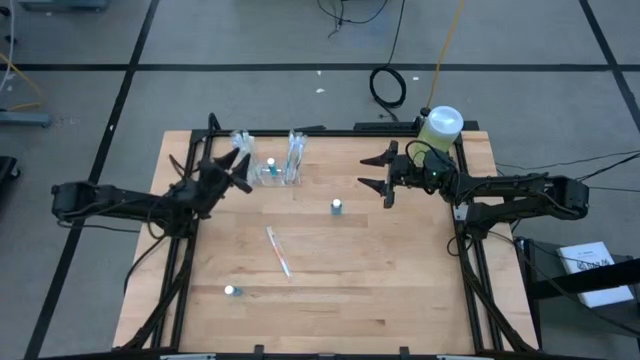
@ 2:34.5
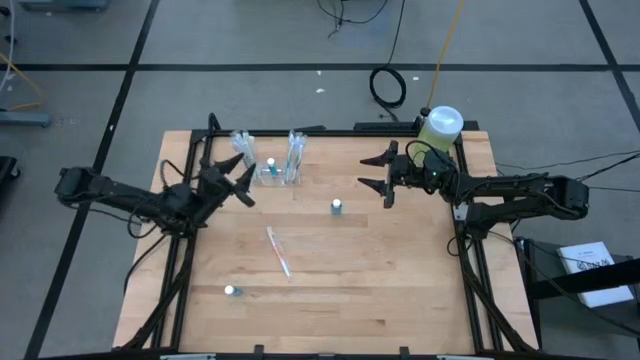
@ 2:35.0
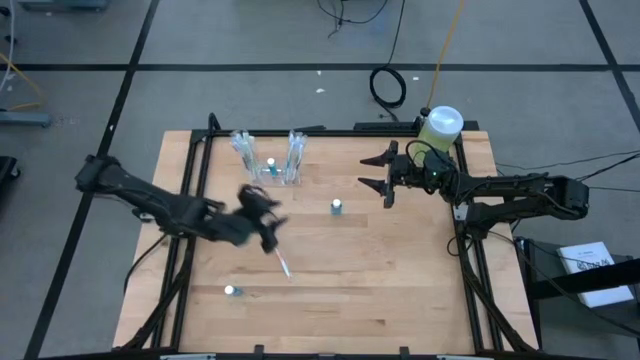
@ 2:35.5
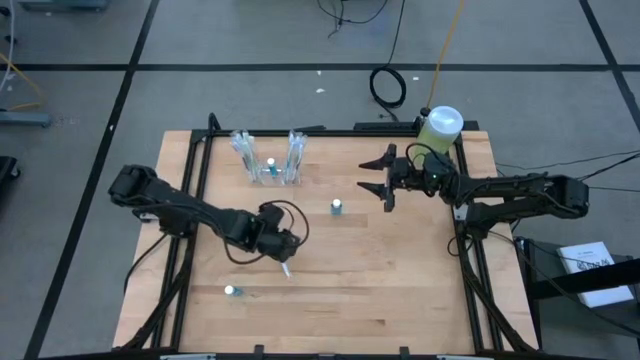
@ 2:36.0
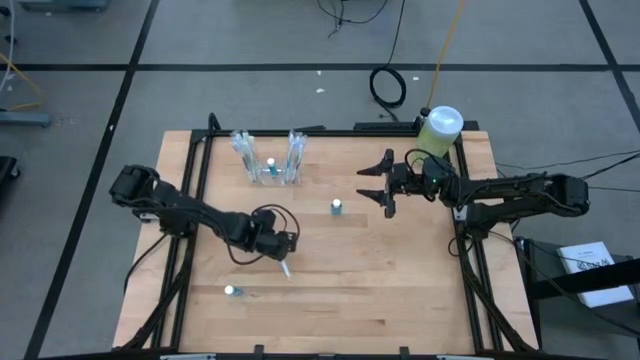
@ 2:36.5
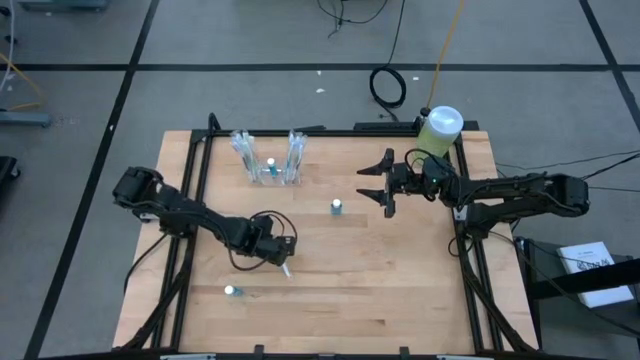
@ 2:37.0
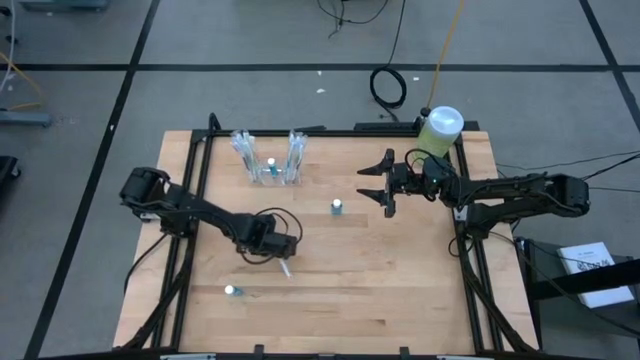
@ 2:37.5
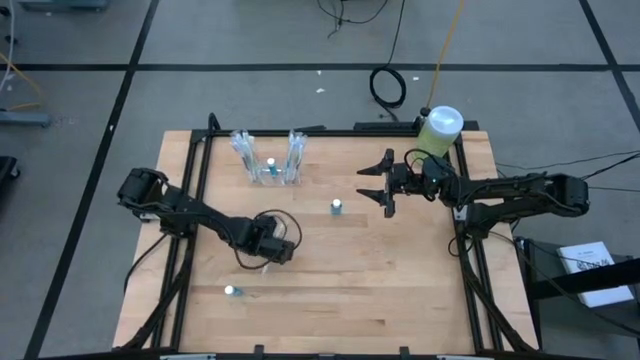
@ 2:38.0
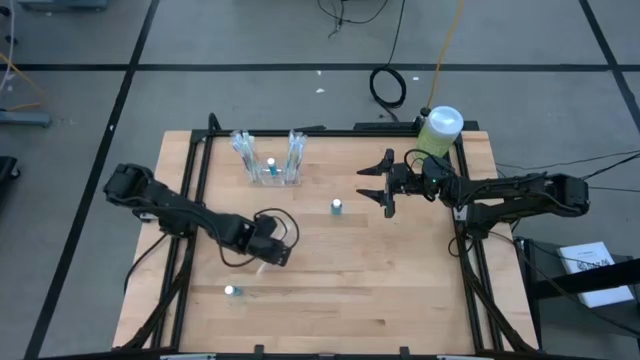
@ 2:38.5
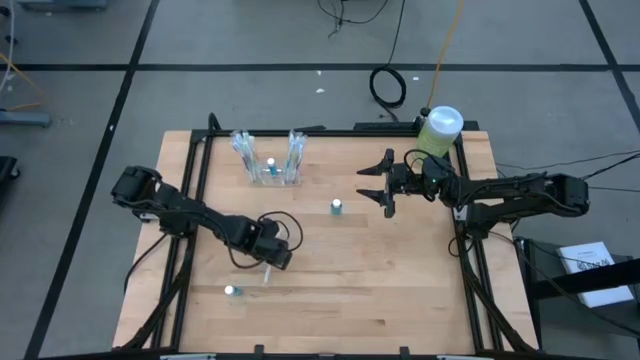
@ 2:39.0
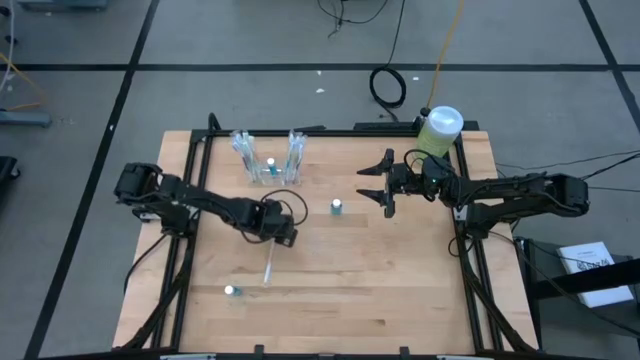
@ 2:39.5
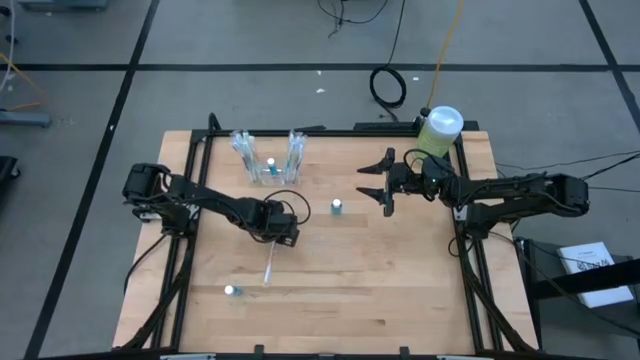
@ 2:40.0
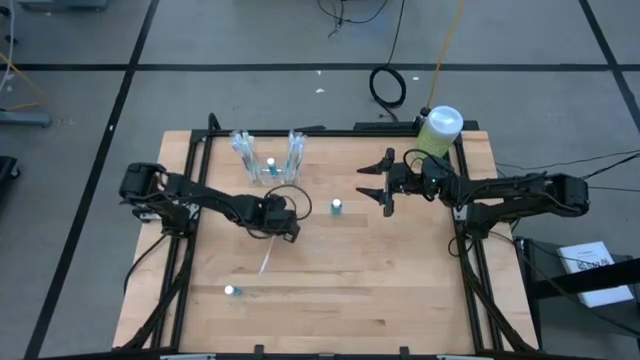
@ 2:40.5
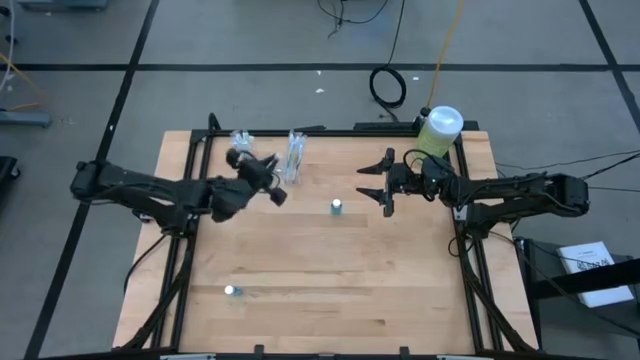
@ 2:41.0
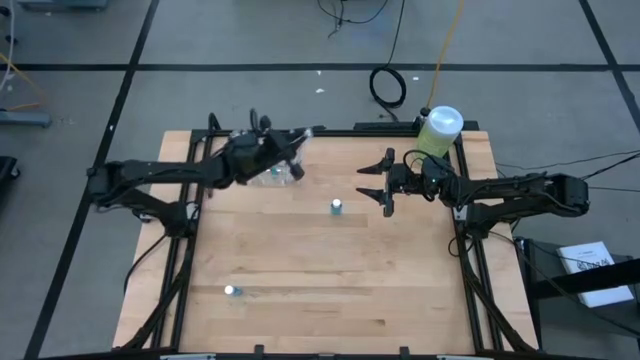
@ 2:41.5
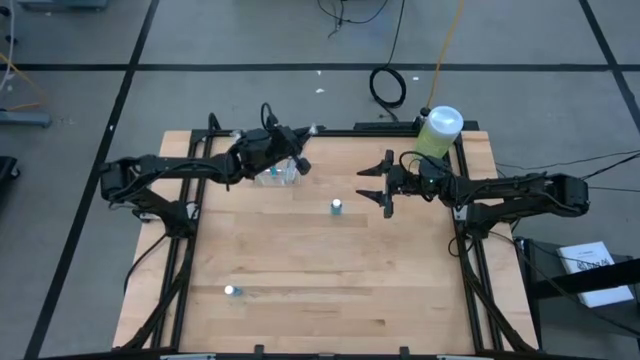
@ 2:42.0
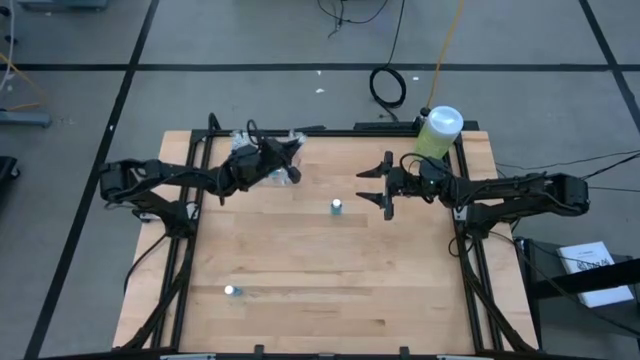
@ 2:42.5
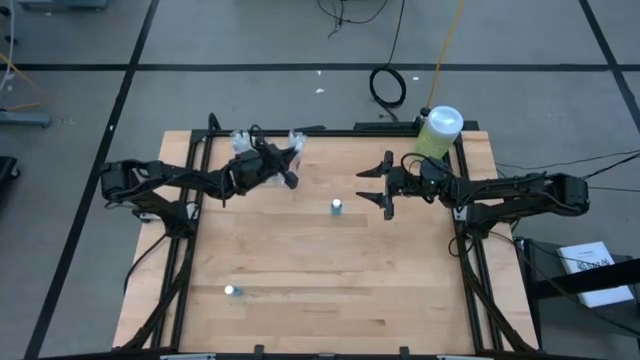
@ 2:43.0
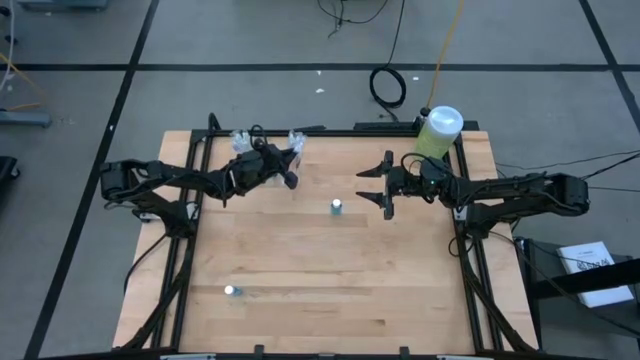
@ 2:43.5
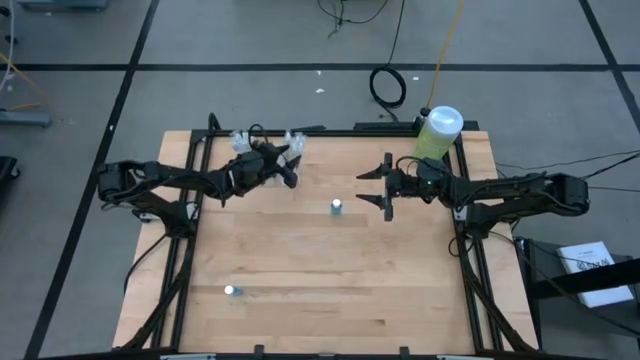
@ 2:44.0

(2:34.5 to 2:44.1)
Task: Pick & Place toothbrushing station
Put the orange toothbrush into the transparent organizer

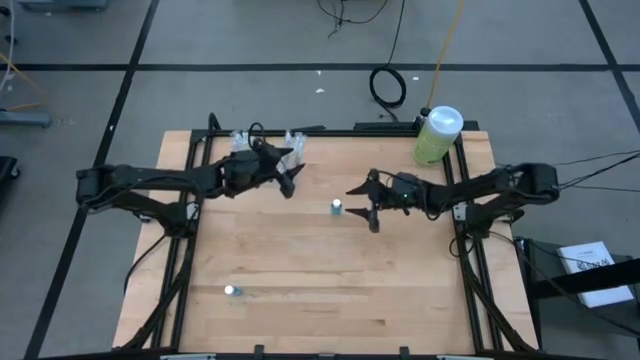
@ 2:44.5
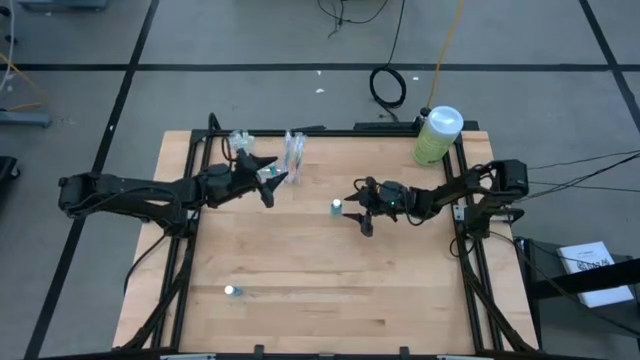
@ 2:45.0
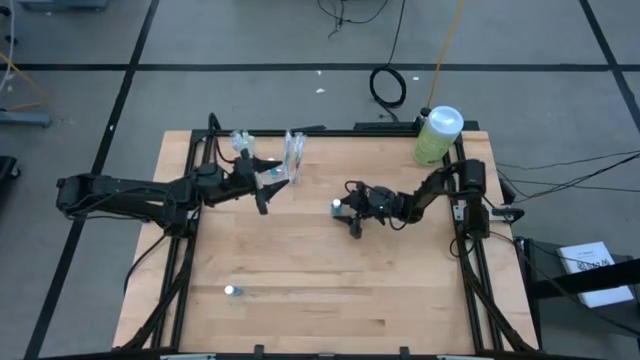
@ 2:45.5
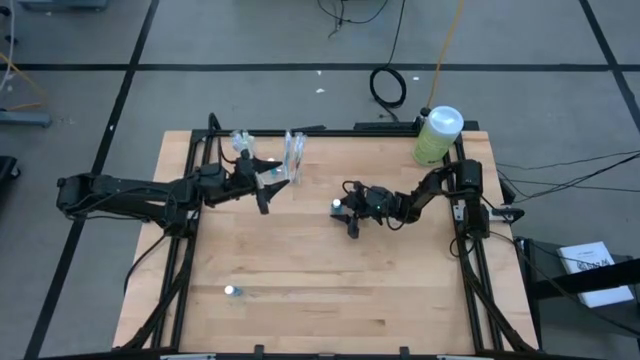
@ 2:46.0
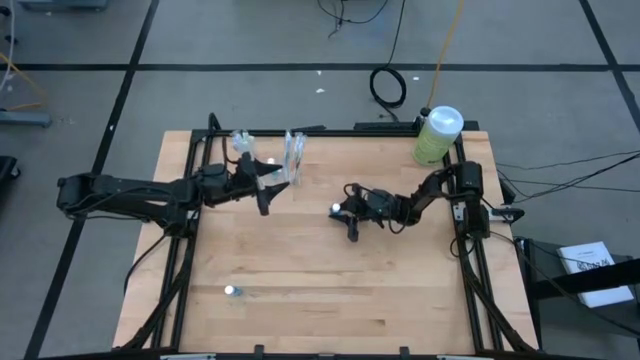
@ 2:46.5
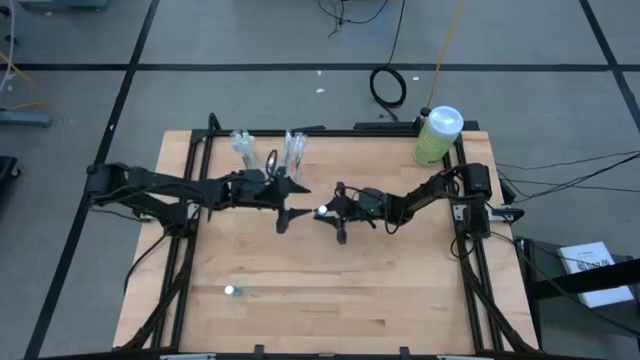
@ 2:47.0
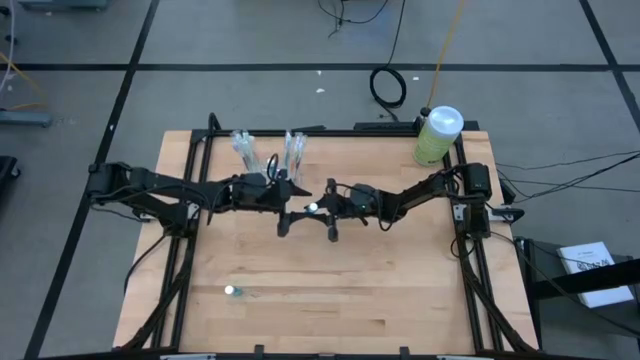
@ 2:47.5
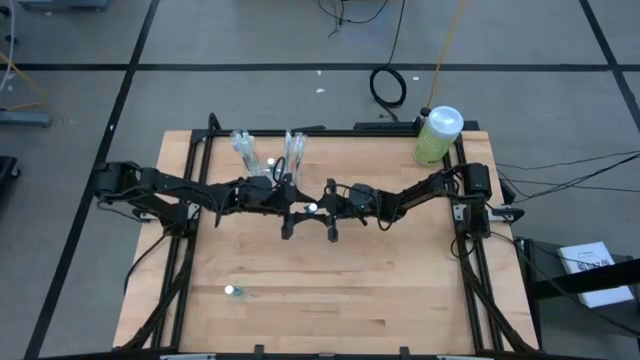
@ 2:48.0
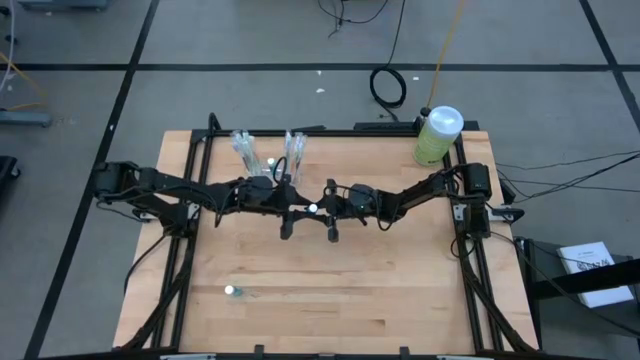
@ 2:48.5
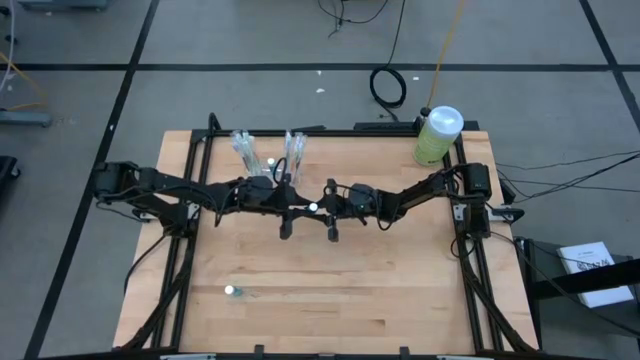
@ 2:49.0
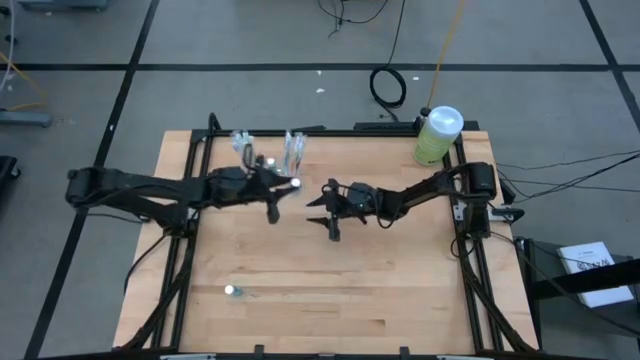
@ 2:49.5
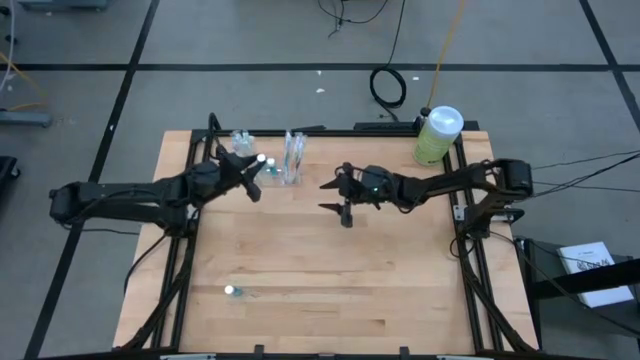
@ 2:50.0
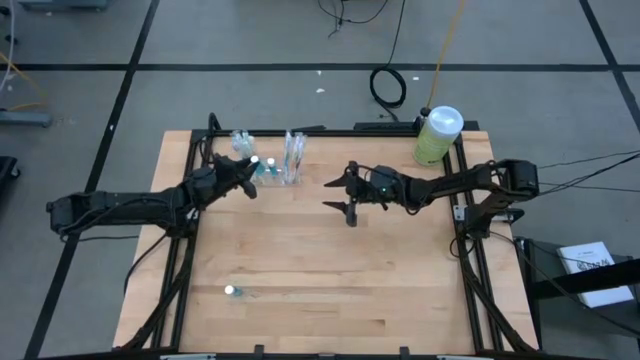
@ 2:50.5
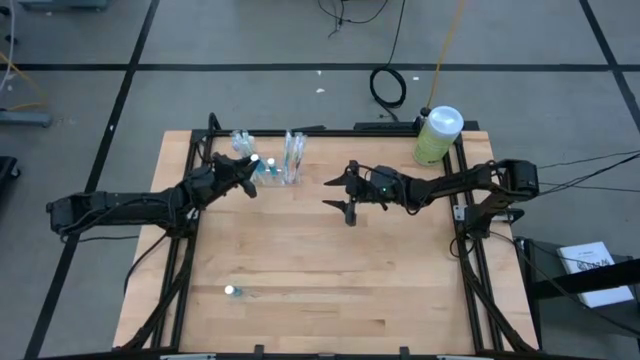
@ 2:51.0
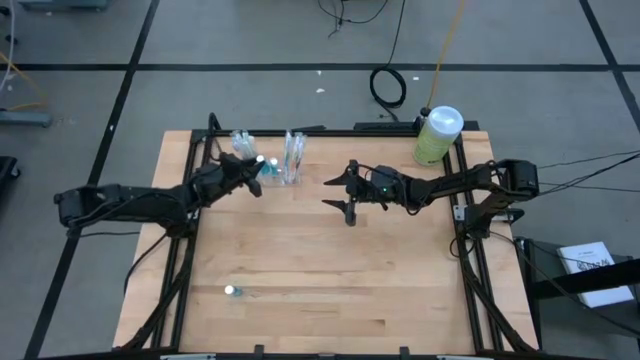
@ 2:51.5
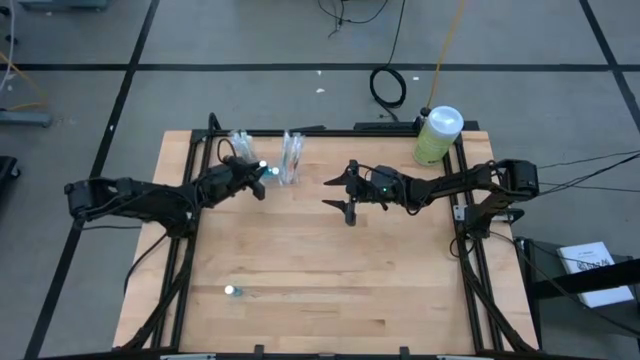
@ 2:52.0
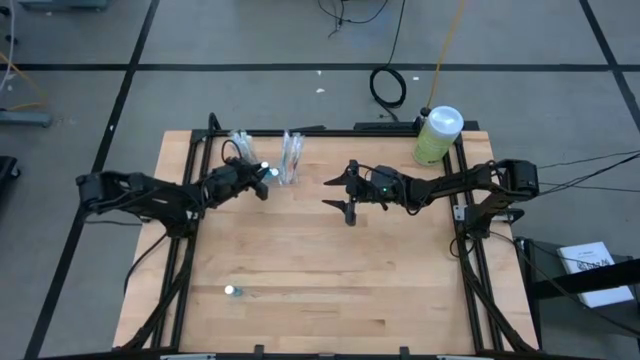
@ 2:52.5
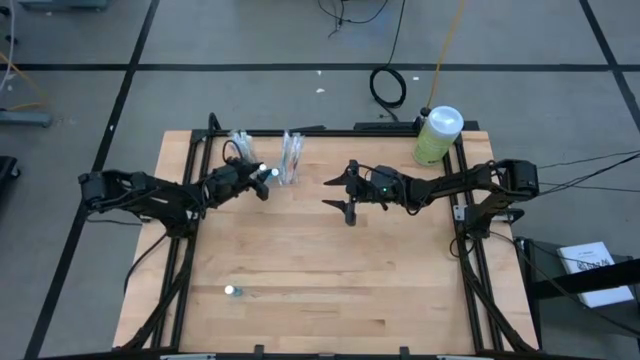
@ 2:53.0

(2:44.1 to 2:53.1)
Put the blue mouthwash into the transparent organizer

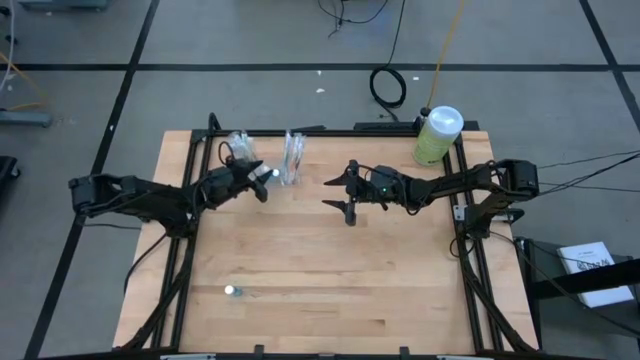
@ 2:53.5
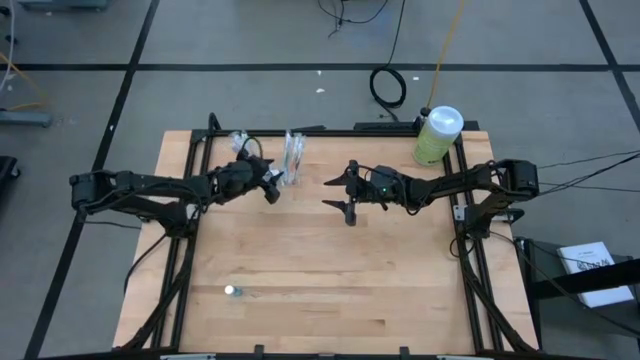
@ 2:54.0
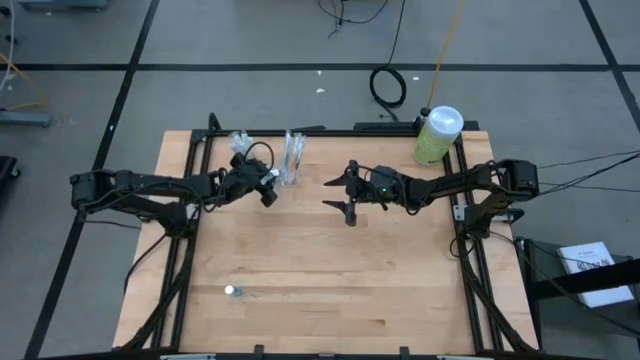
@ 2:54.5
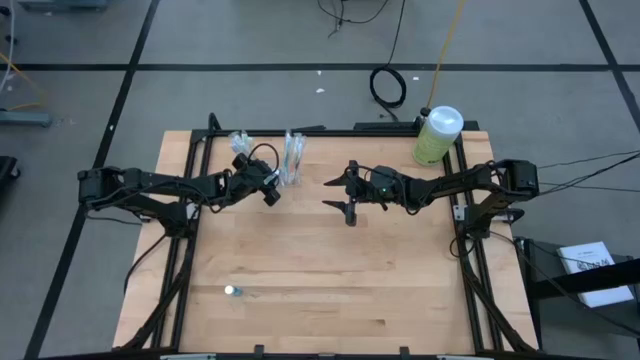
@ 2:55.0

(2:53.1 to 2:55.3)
Adjust the mouthwashes in the transparent organizer

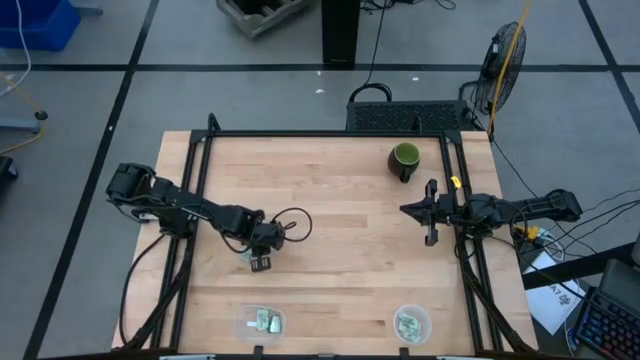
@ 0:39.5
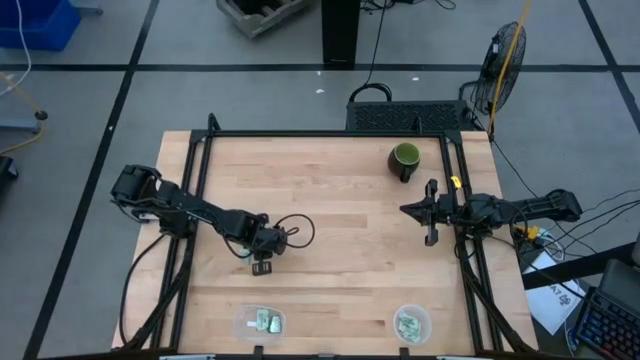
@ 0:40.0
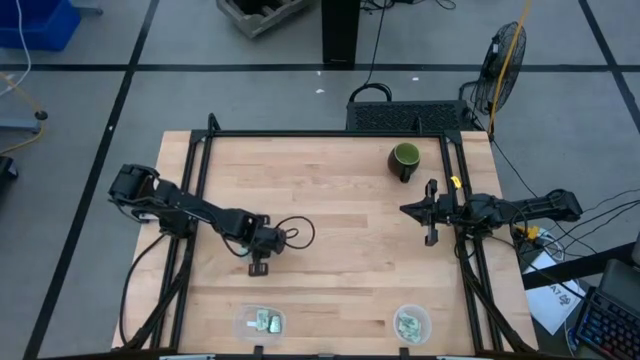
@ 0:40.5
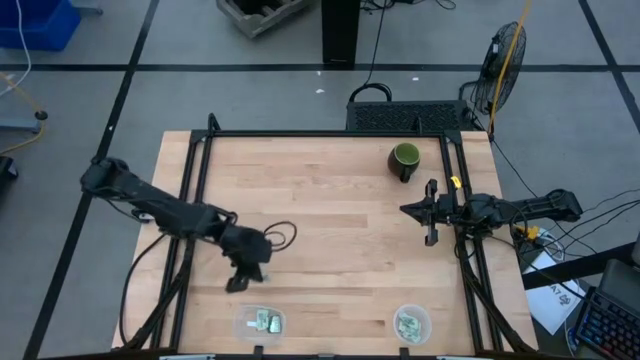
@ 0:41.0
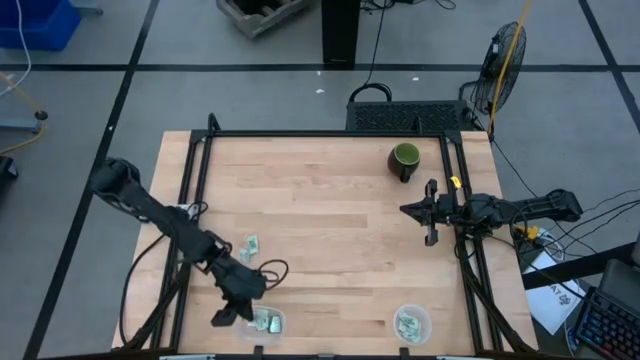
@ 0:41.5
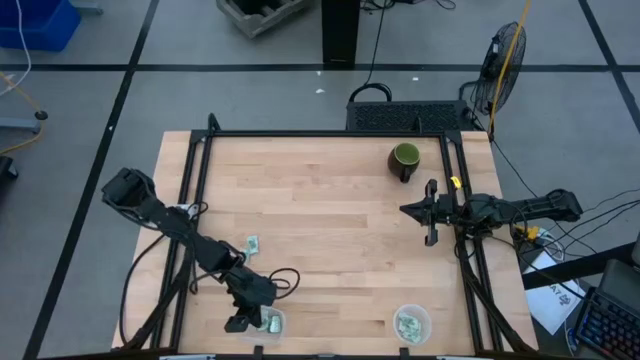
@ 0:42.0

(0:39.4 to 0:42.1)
Task: Pick and place Stevia / Truvia into bins
Put the stevia packet into the left transparent container
